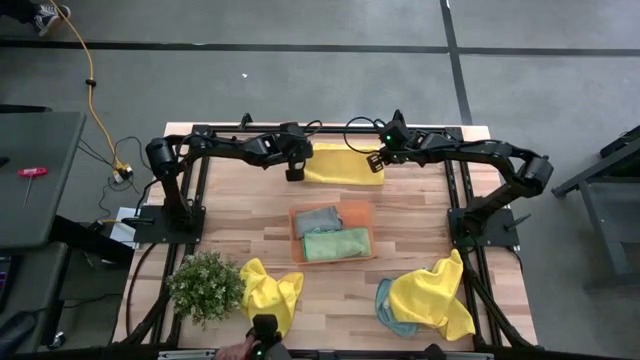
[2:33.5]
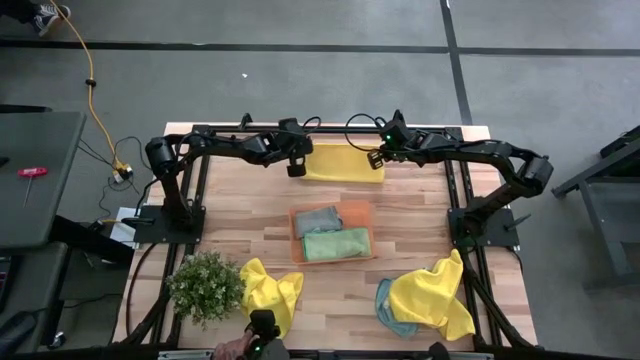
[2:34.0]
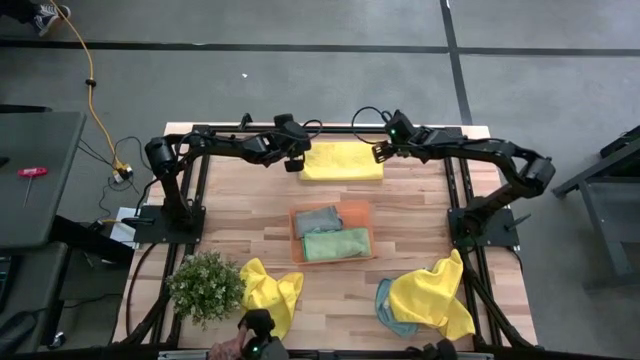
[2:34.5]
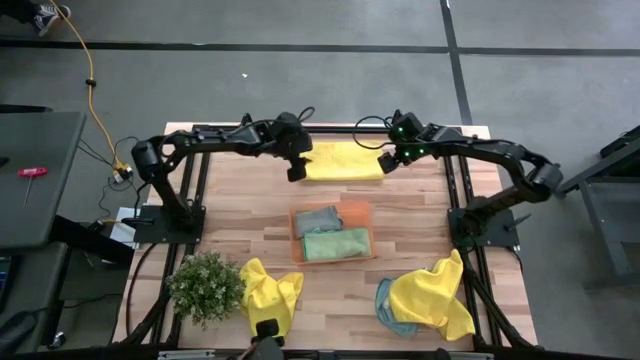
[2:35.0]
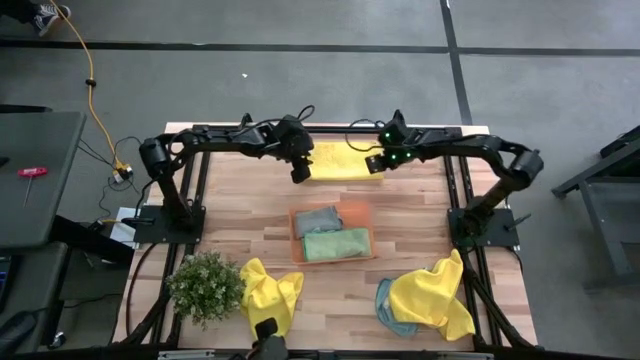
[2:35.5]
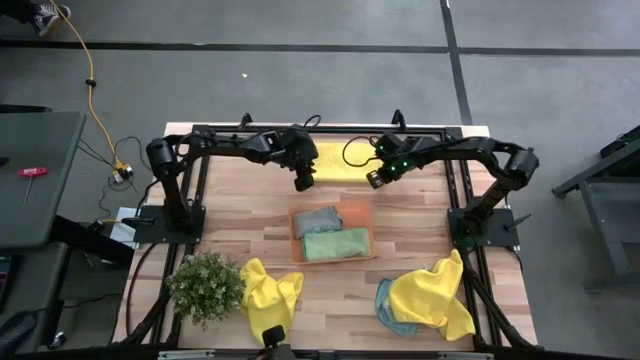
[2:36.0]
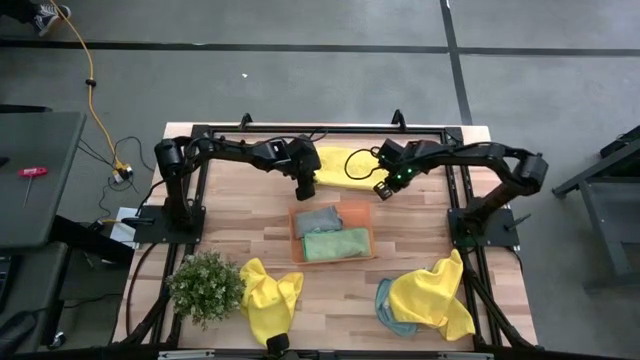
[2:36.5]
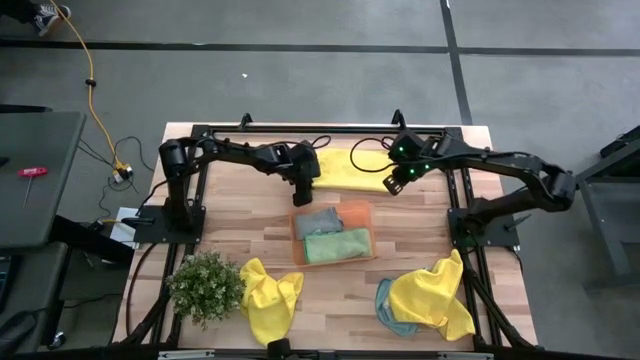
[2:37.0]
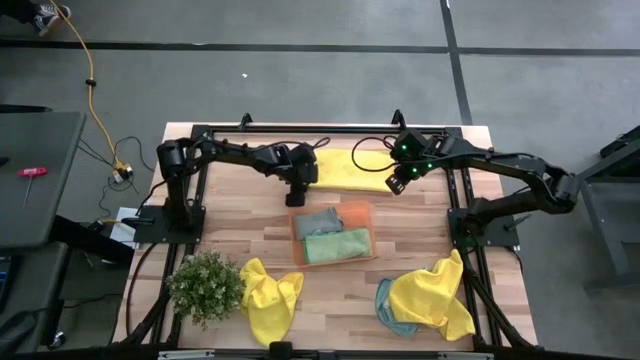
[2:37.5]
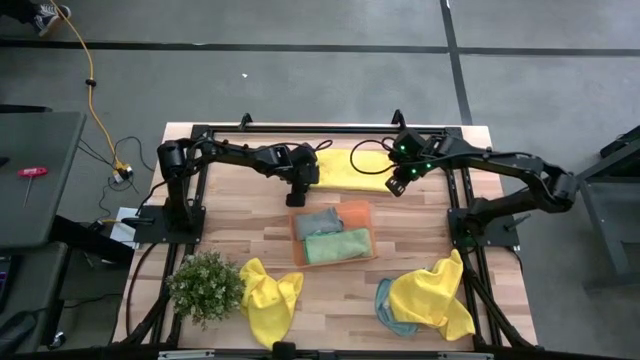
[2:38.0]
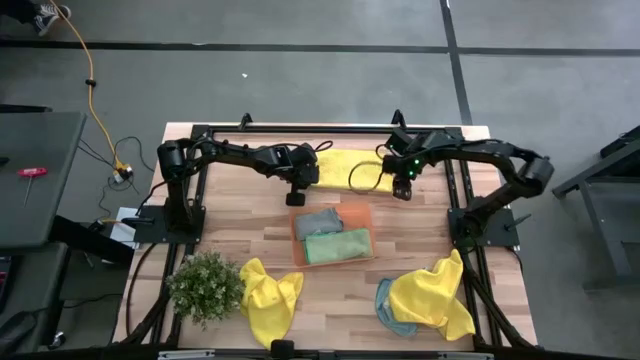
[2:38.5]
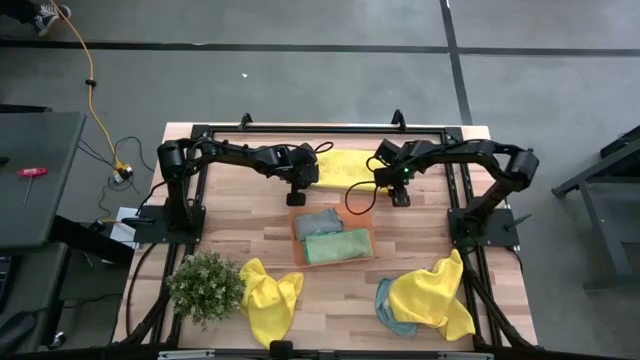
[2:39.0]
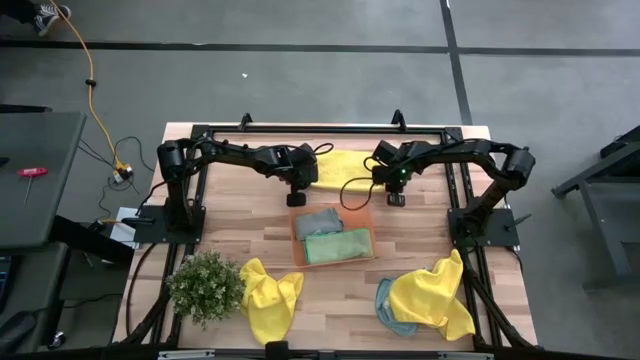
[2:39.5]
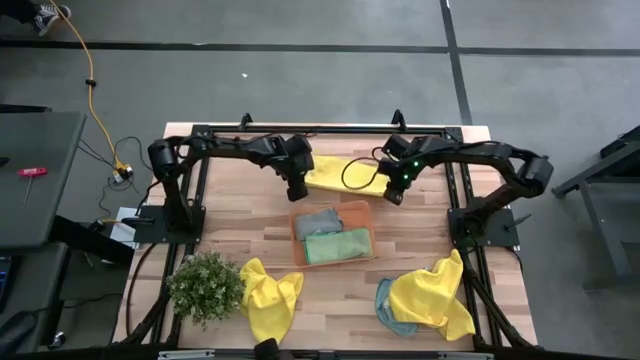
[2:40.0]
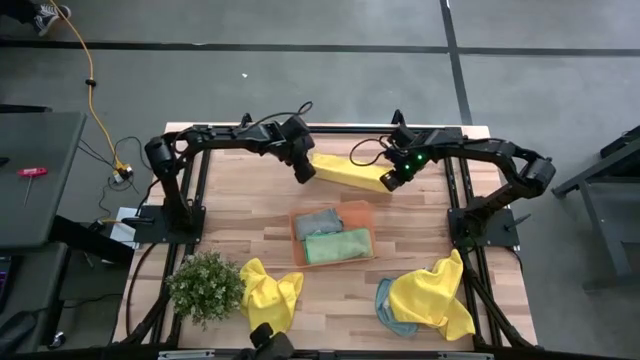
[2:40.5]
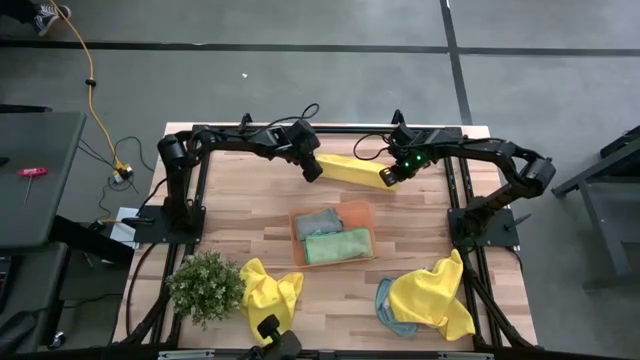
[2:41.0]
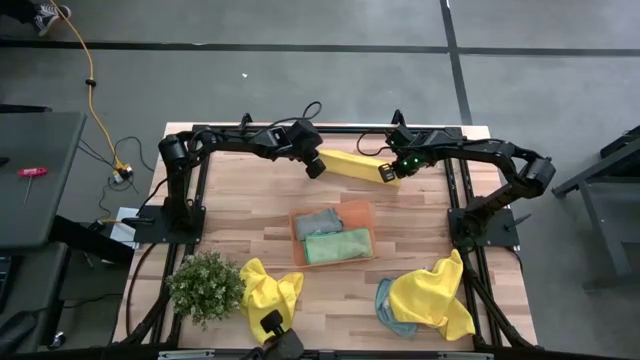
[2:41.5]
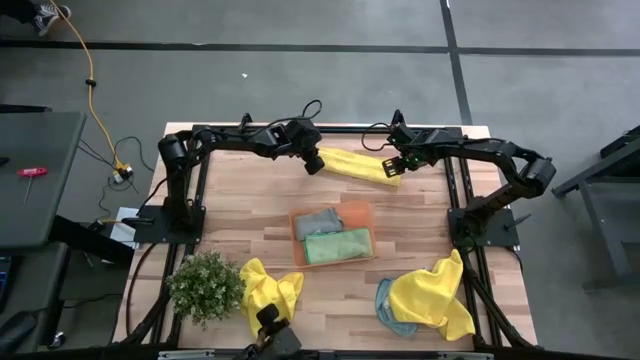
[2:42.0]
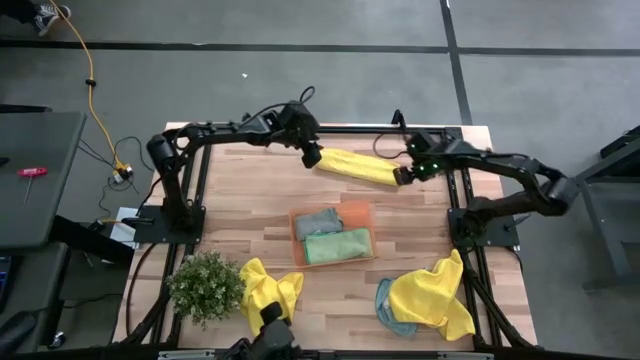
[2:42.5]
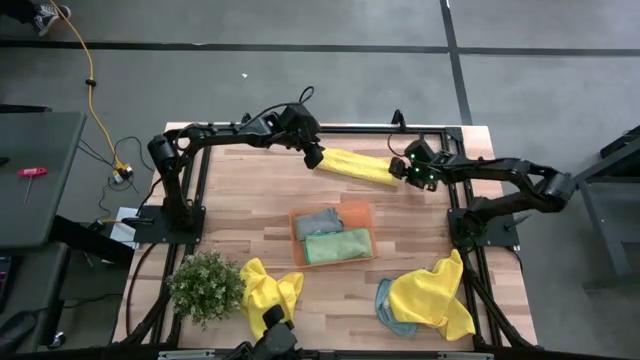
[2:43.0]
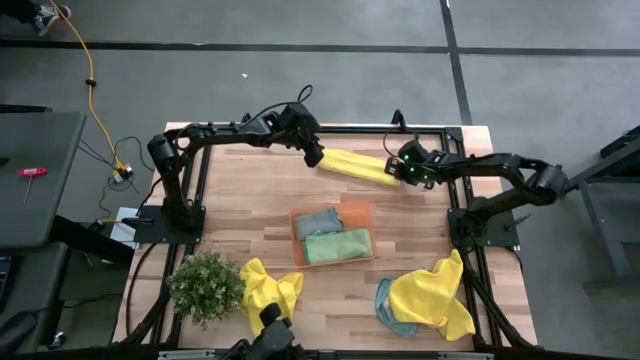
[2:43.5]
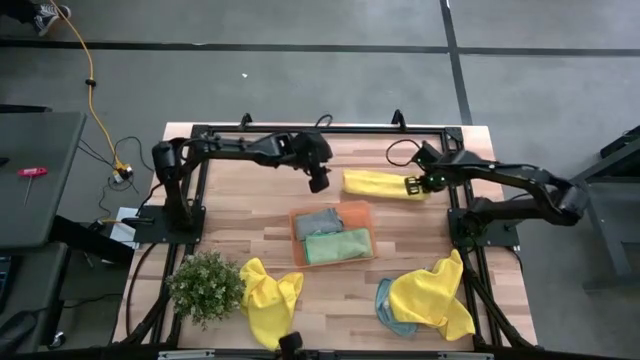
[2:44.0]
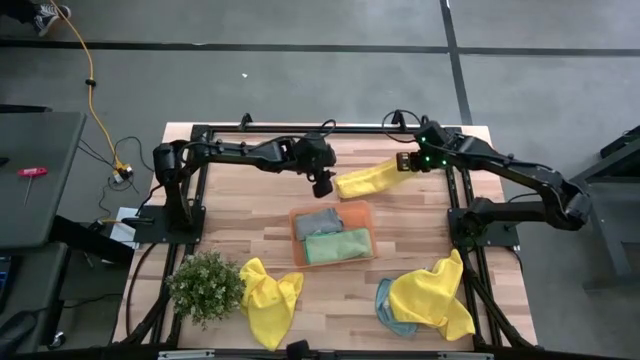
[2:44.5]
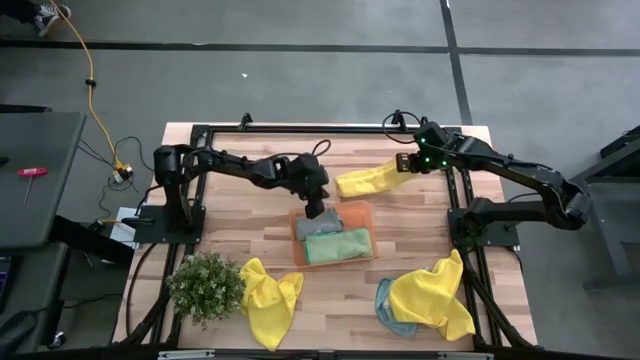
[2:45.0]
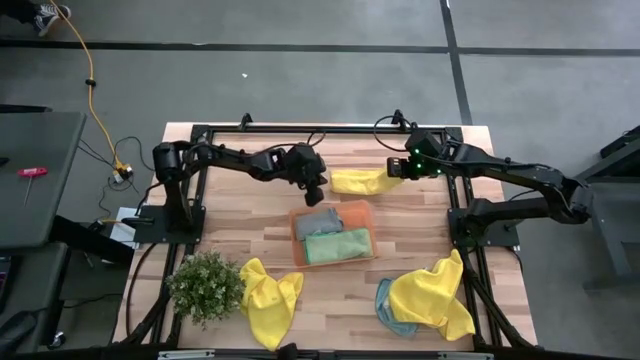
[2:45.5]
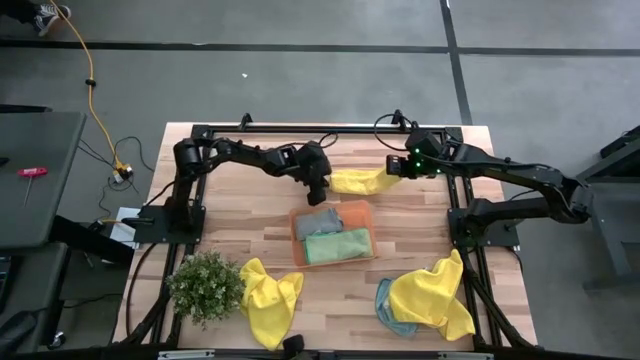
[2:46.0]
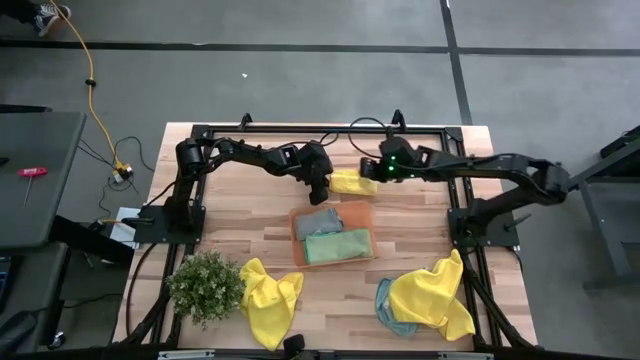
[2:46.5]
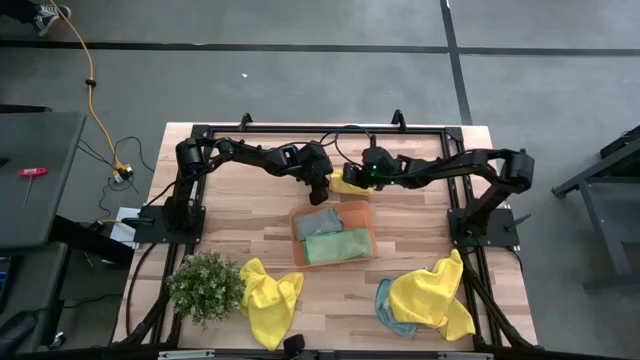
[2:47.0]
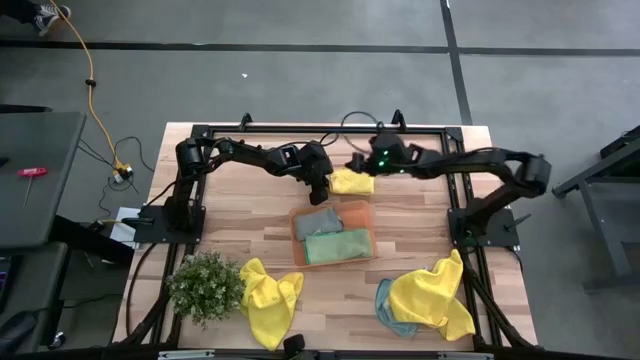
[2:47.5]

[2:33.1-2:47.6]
Task: Fold microfiber towels
Fold the top right yellow microfiber towel

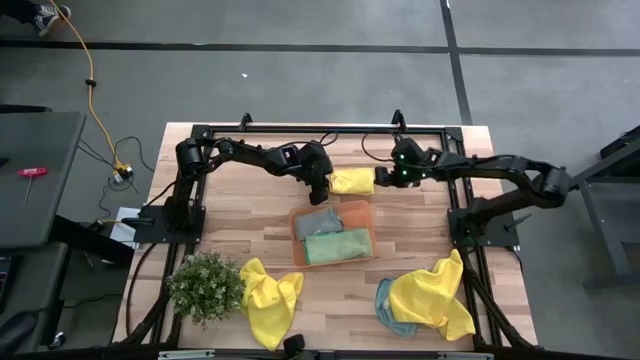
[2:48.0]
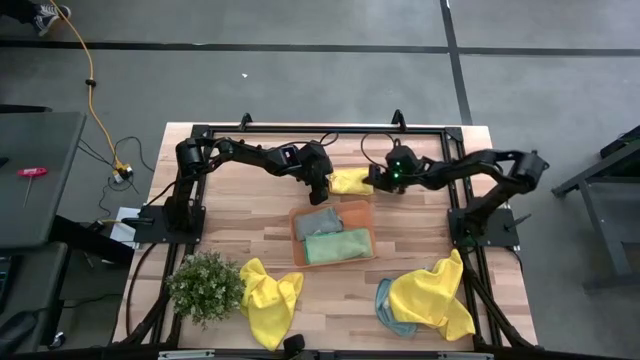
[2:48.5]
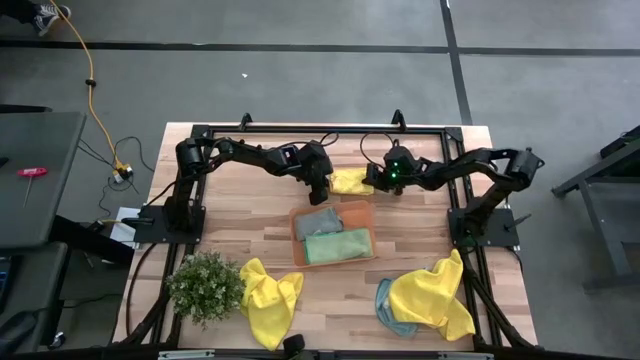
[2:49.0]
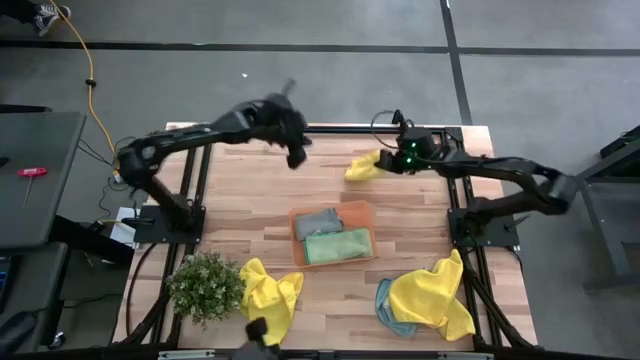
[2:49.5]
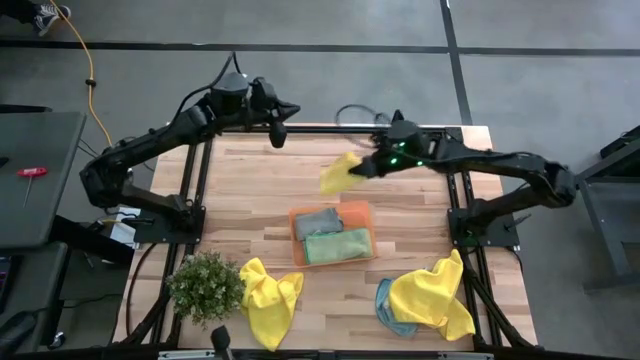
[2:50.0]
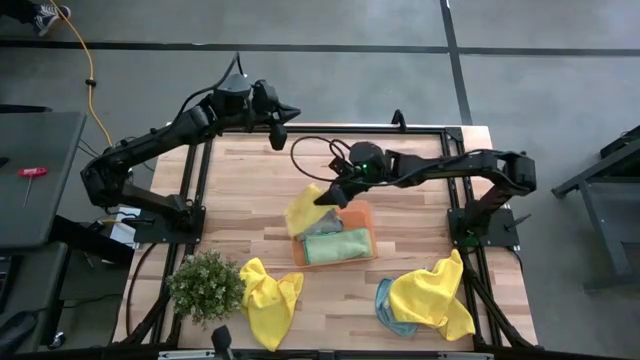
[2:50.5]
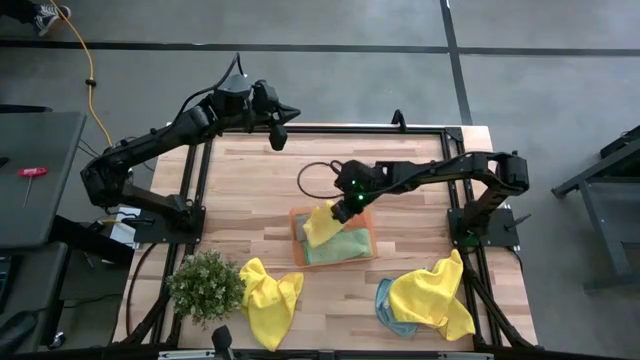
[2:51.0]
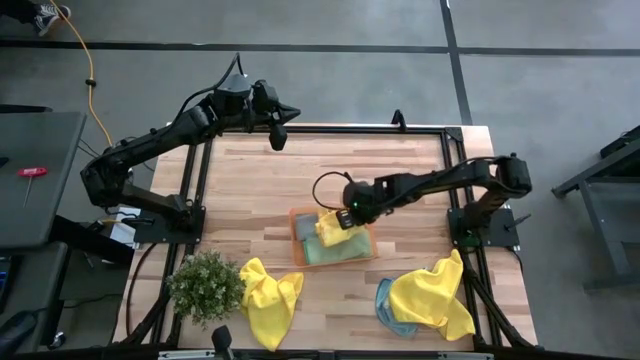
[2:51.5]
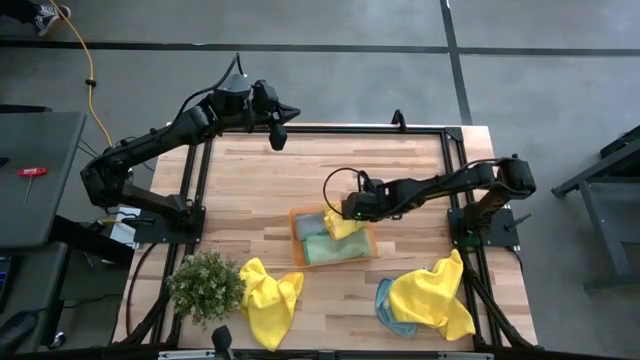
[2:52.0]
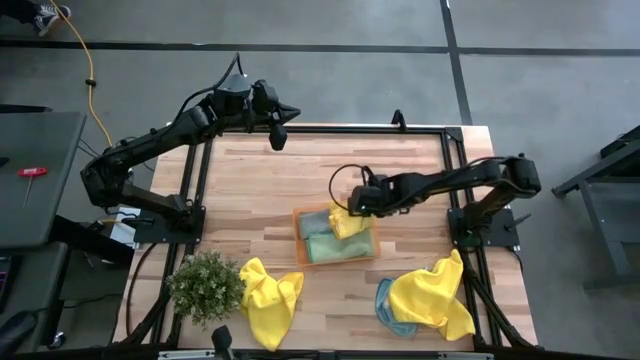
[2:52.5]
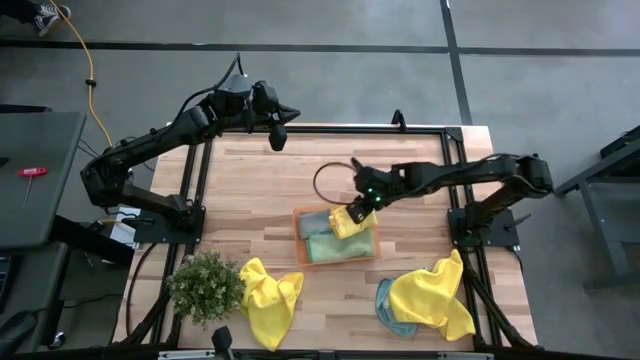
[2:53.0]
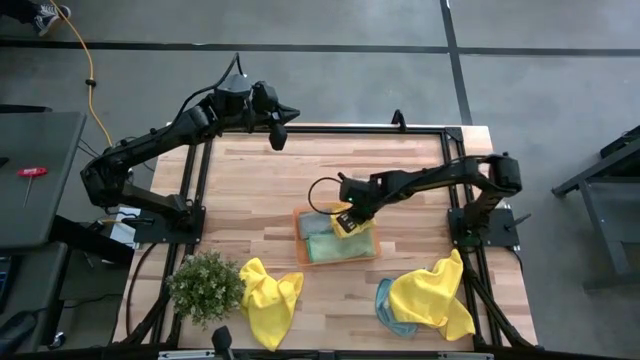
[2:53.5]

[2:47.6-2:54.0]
Put the top right yellow microfiber towel into the orange bin
